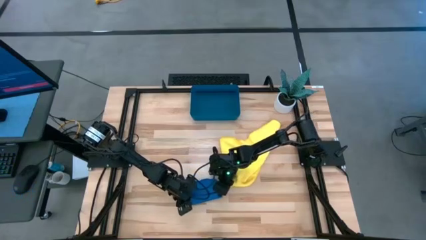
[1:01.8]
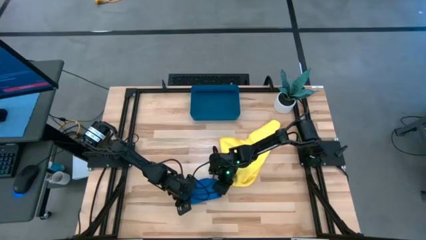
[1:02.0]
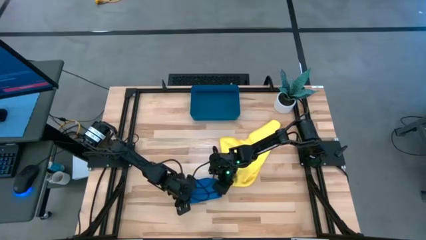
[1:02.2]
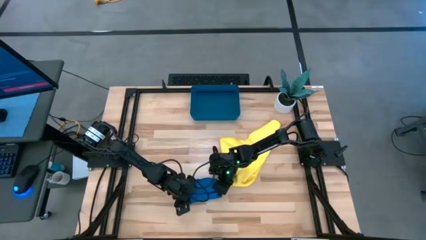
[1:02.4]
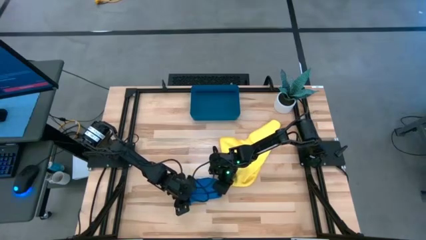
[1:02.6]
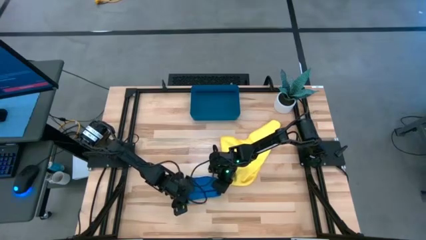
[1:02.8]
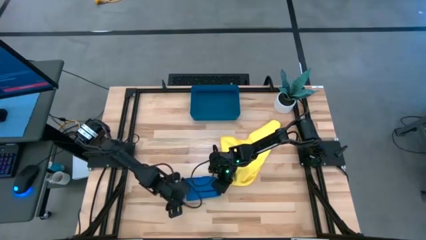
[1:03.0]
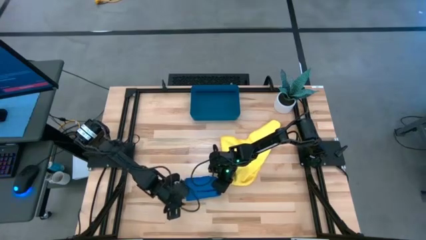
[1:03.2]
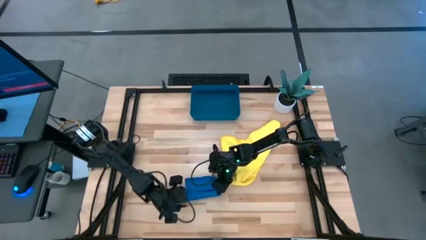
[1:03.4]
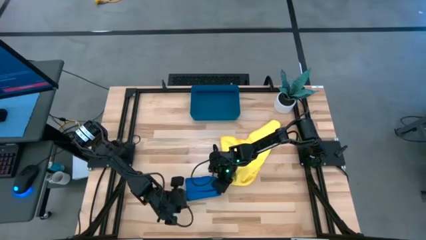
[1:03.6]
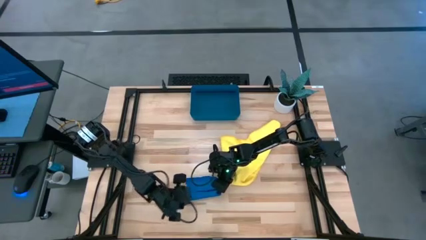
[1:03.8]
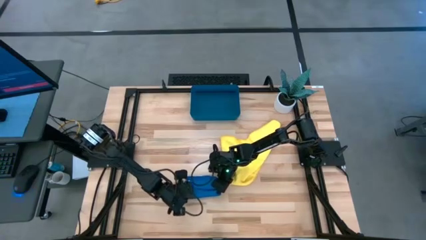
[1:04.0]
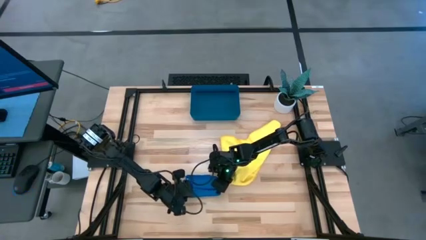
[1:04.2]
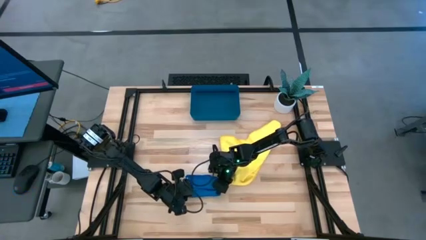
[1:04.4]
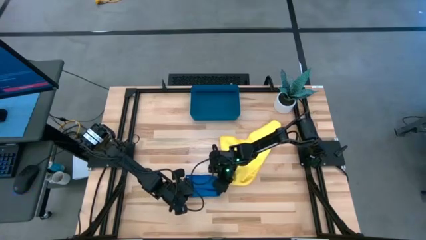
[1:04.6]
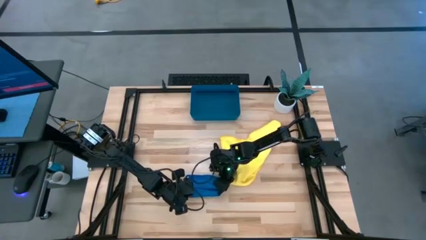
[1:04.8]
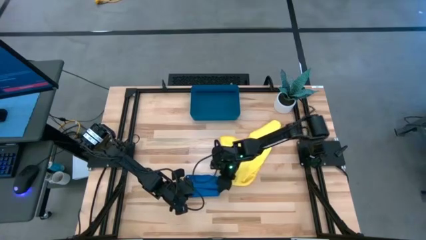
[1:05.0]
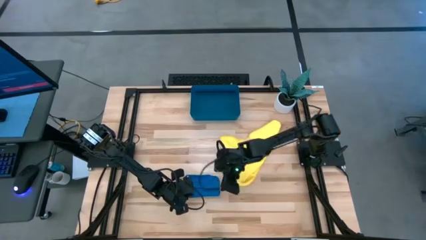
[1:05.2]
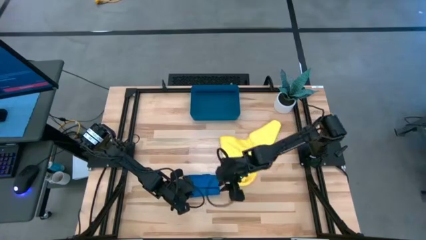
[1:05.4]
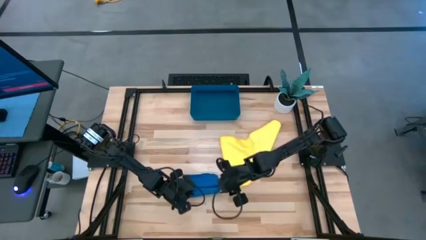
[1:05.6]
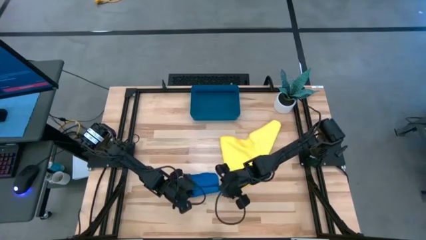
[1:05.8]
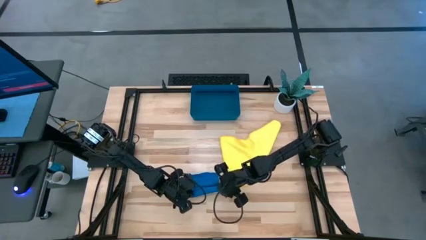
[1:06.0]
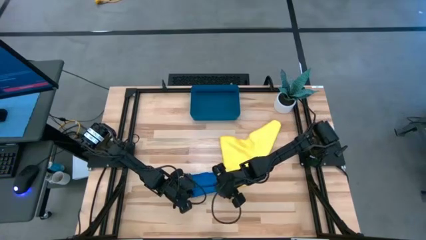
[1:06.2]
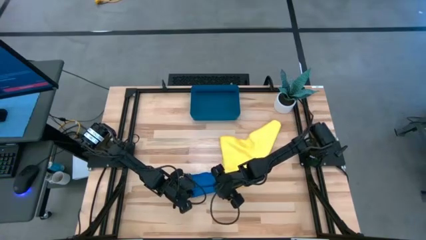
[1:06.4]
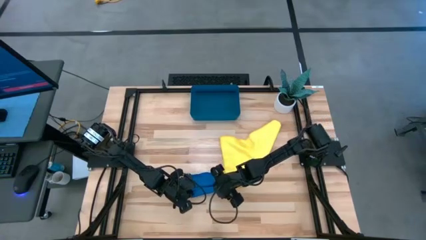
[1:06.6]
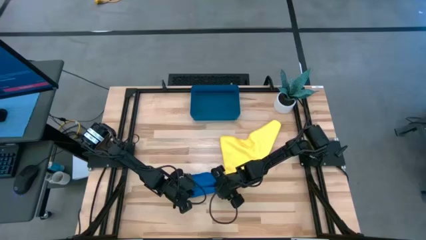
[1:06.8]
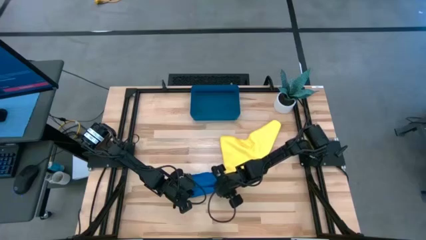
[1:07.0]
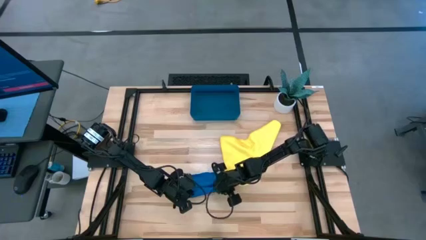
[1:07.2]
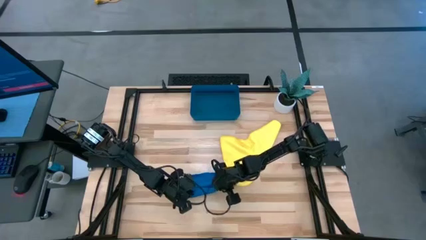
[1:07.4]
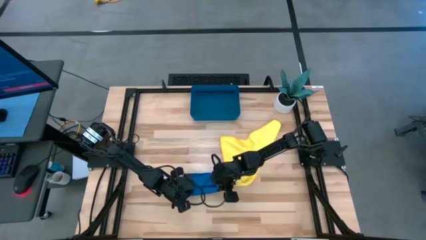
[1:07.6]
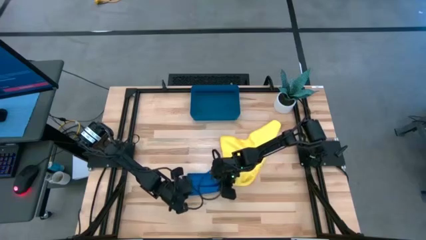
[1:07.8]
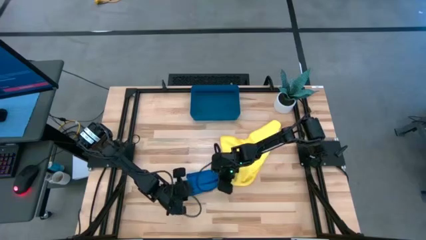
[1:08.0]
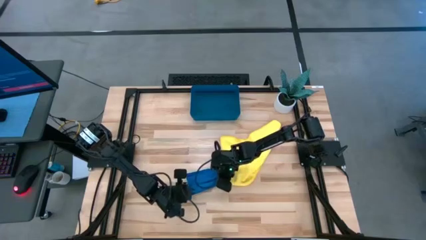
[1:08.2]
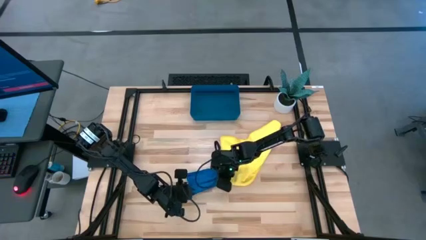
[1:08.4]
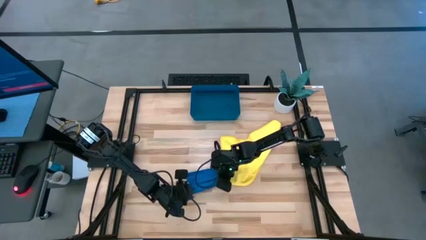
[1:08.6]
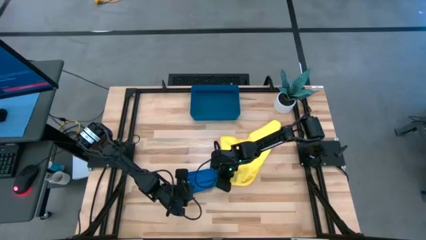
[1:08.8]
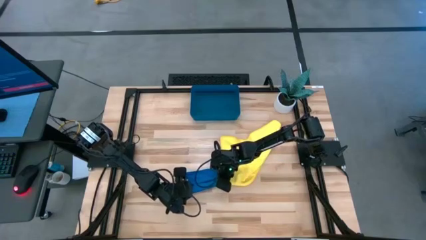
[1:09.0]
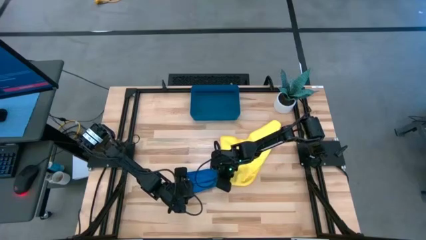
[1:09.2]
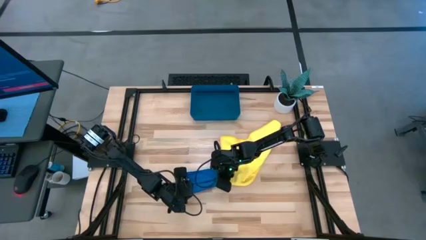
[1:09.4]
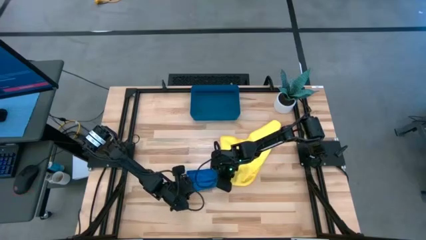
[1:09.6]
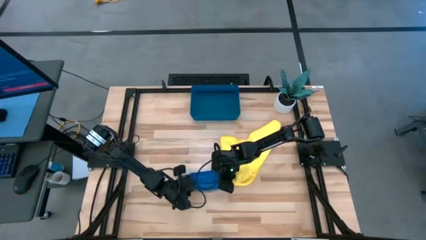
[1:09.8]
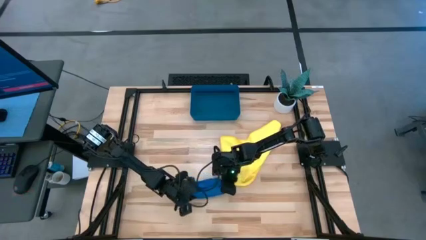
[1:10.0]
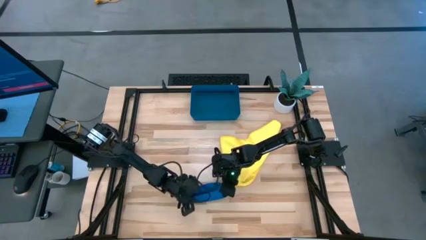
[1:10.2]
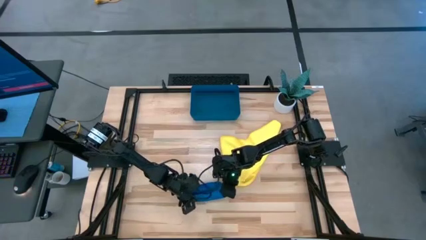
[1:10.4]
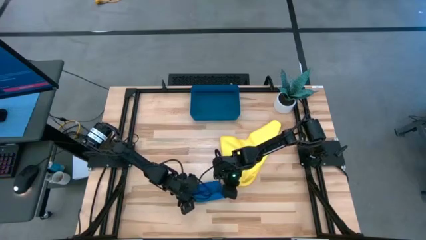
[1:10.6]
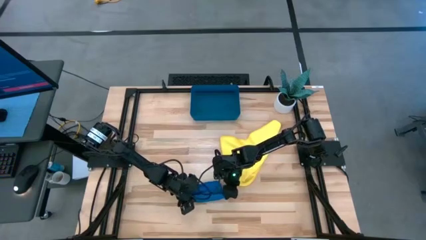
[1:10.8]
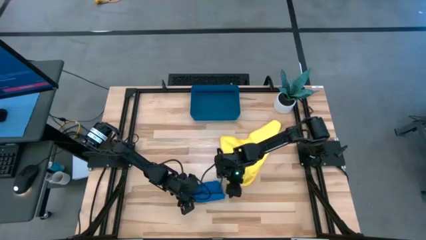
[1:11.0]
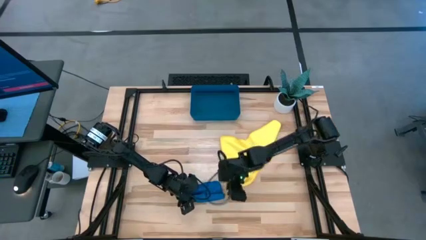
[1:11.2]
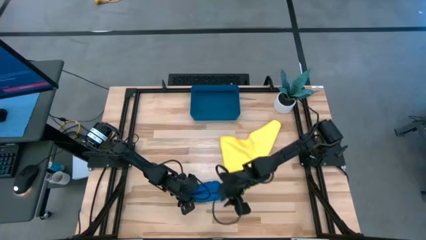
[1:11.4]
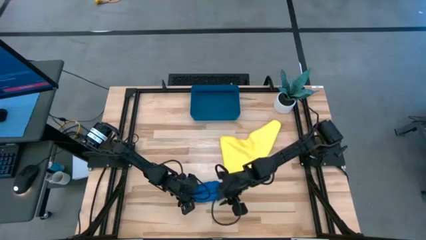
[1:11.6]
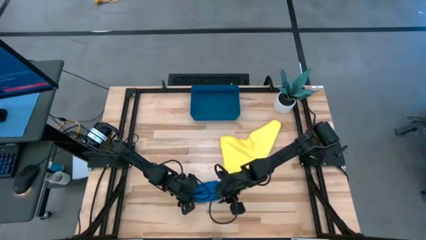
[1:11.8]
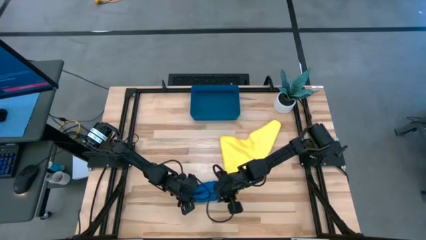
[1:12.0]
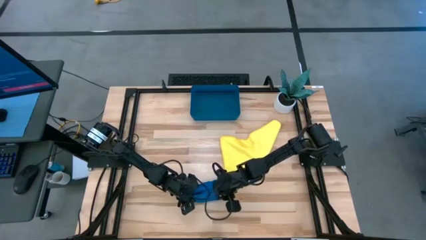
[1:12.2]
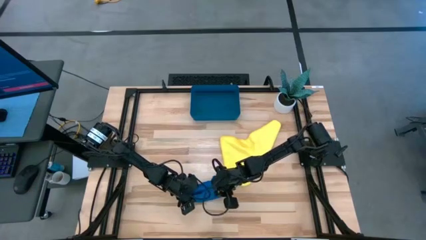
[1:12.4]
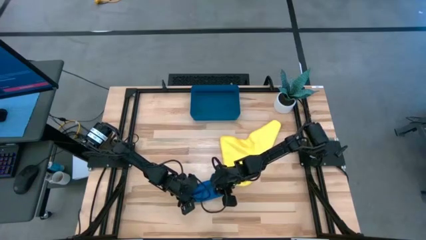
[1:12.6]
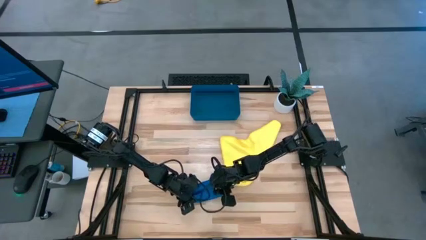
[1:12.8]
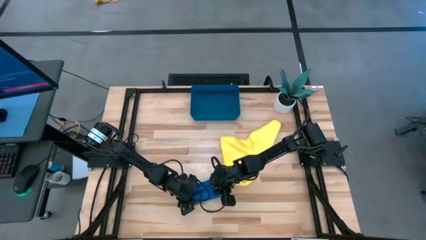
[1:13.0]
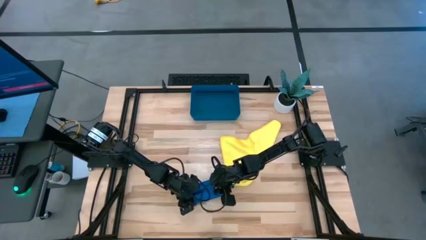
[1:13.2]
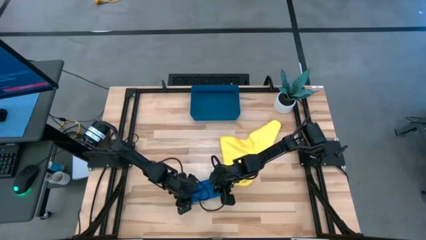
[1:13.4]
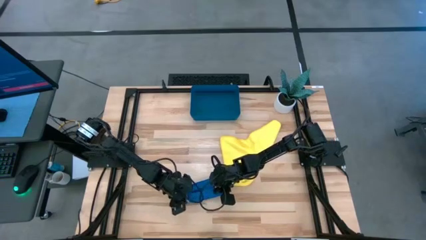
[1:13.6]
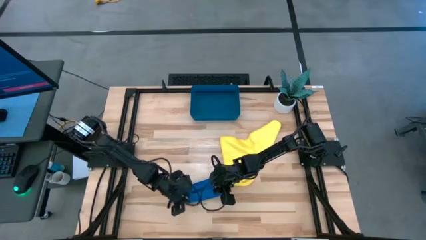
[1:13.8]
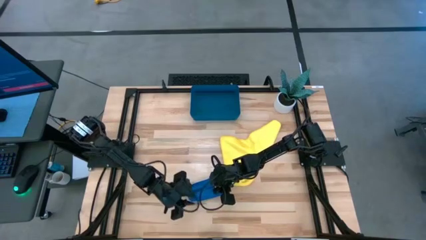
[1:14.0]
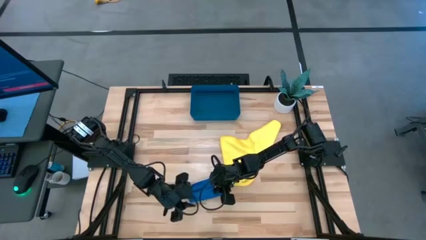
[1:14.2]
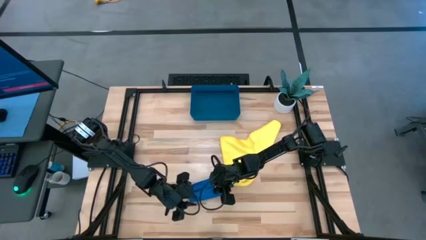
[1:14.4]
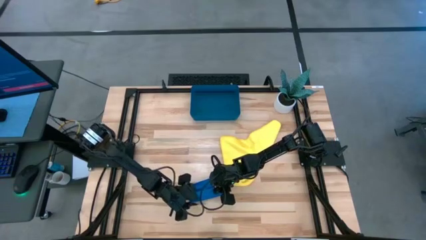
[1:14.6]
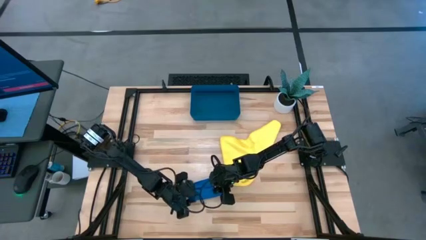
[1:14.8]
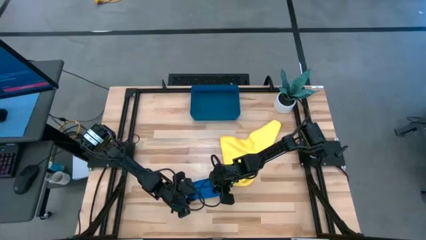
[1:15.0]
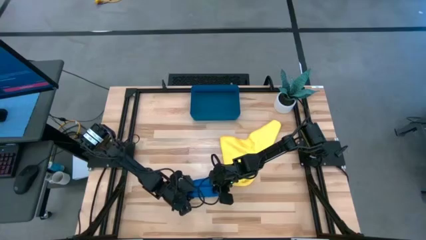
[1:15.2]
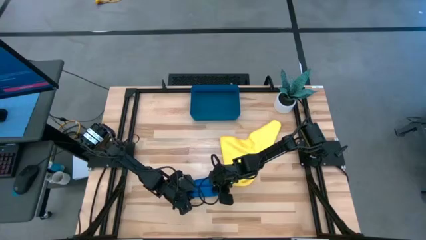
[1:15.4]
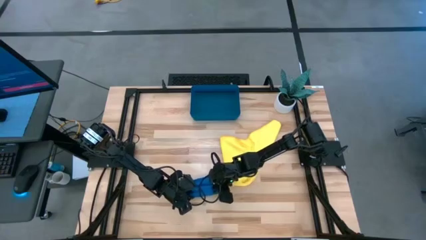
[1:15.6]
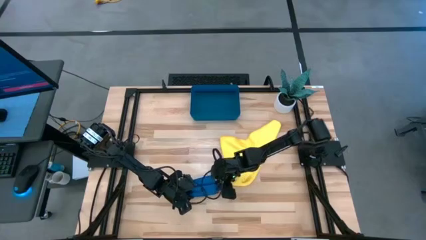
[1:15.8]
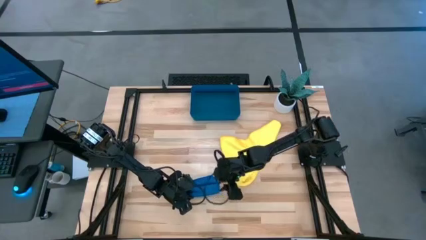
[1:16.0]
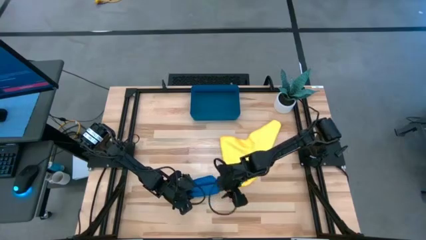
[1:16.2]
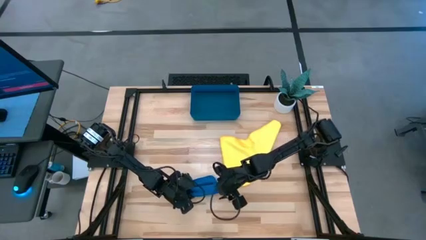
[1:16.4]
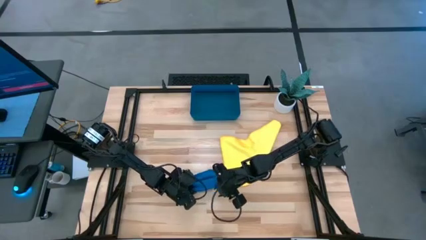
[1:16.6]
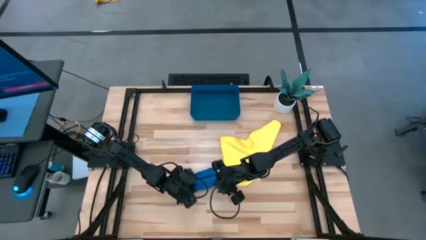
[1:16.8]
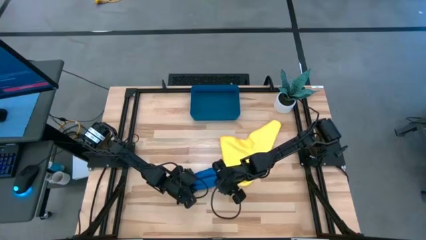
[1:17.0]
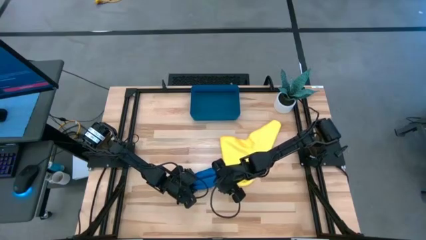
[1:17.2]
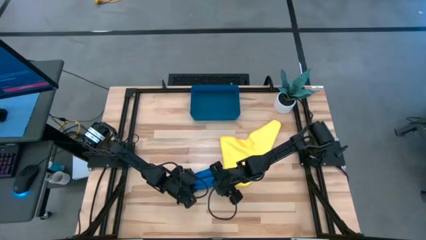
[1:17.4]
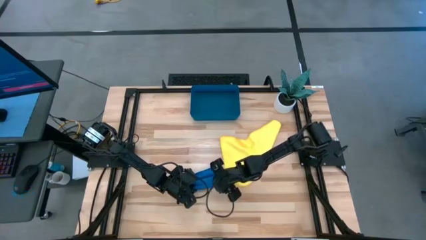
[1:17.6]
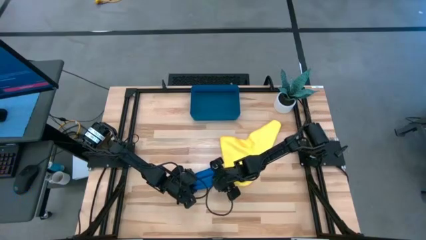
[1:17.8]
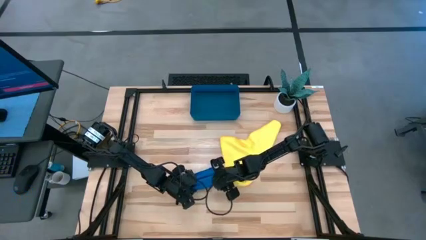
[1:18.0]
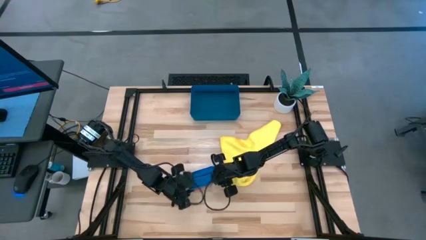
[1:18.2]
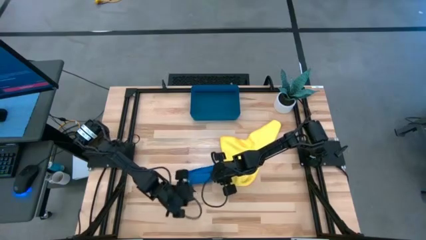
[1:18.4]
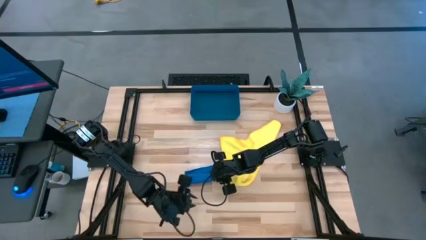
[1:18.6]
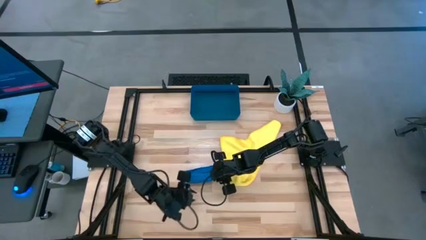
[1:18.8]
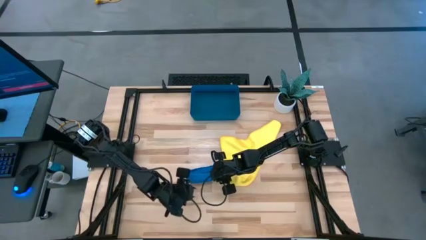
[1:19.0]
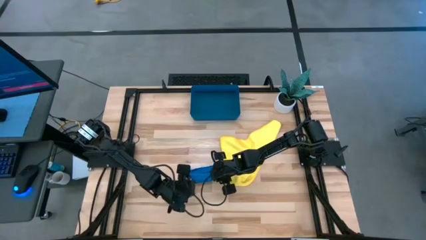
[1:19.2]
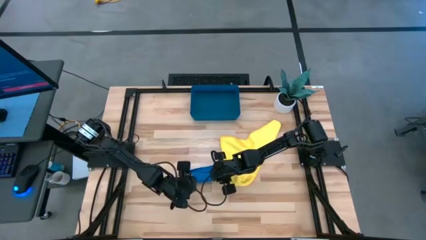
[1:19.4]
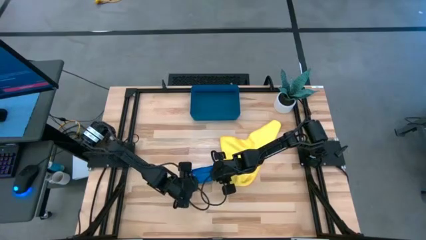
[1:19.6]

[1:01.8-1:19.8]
Task: Roll microfiber towels into tight, uniform cylinder then place into a basket
Roll the blue towel
